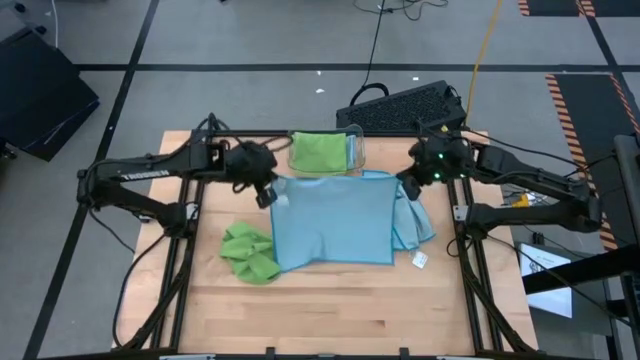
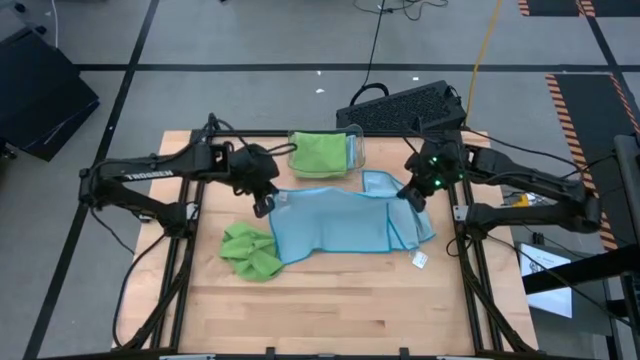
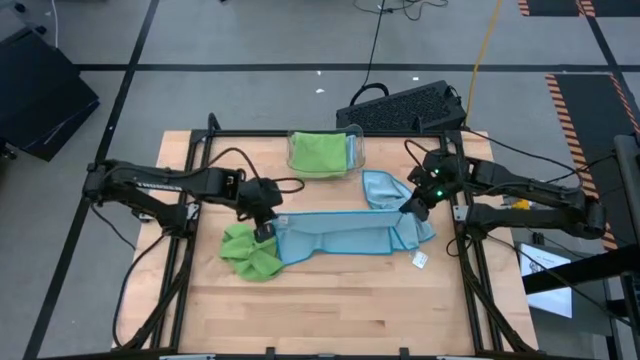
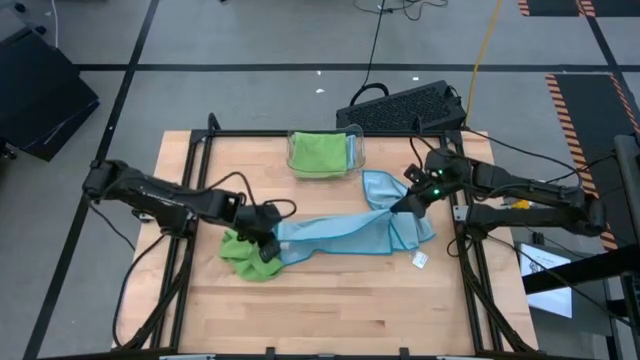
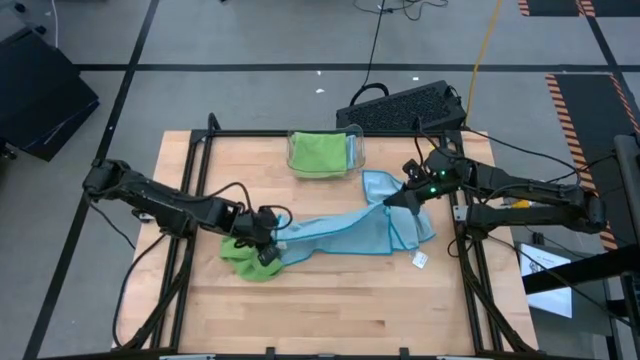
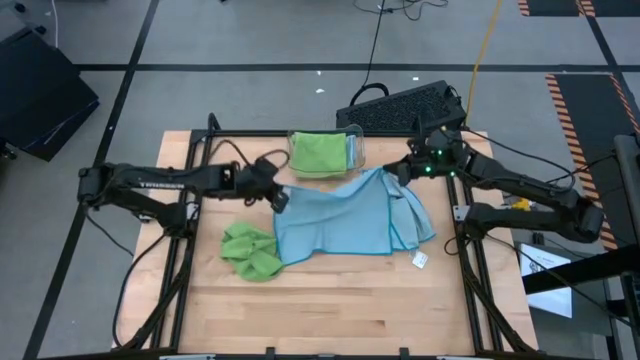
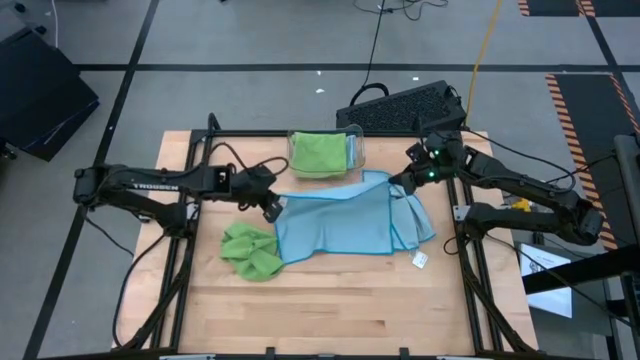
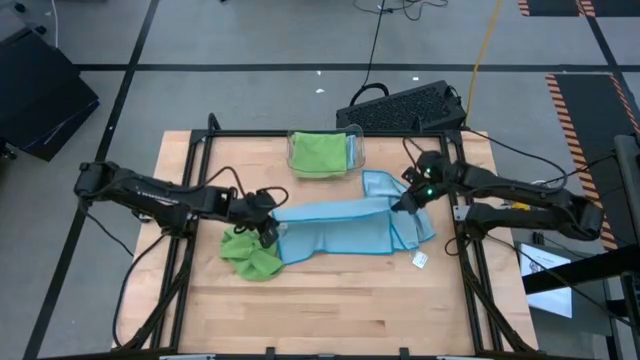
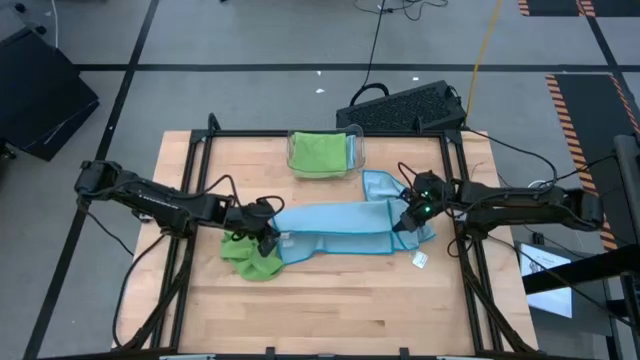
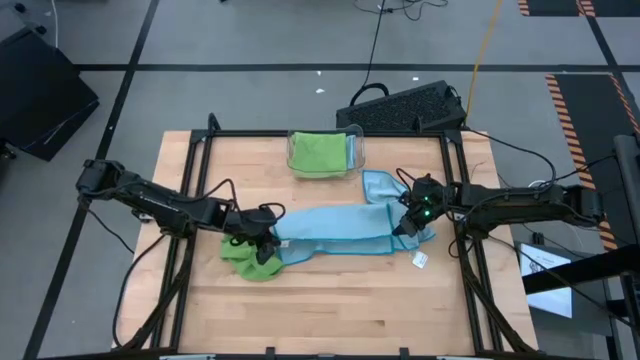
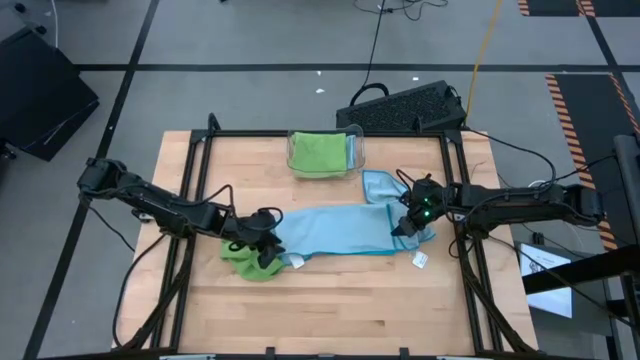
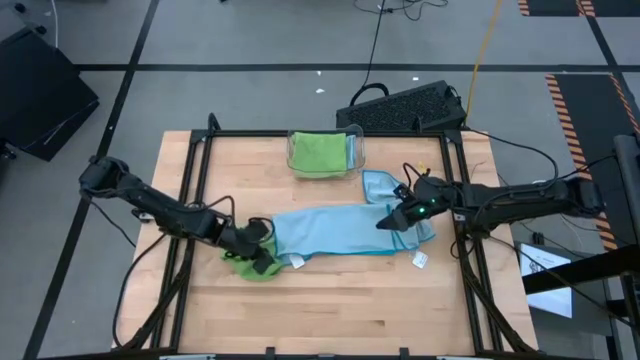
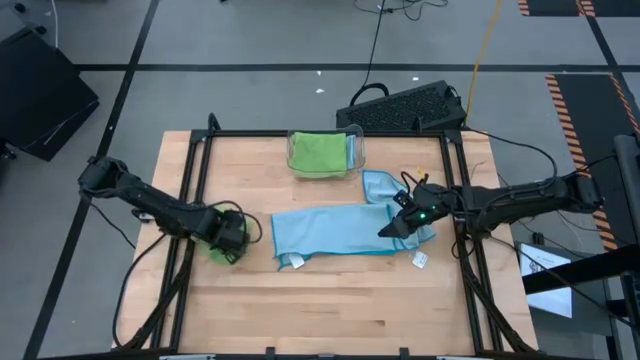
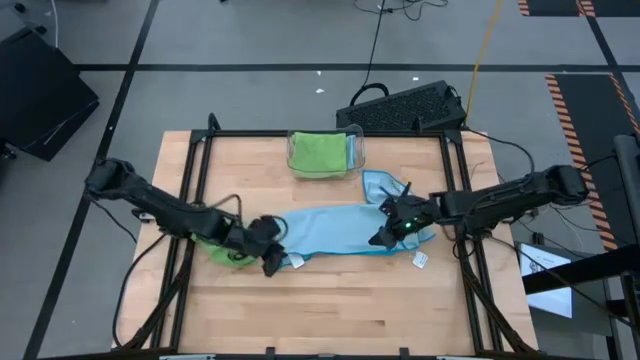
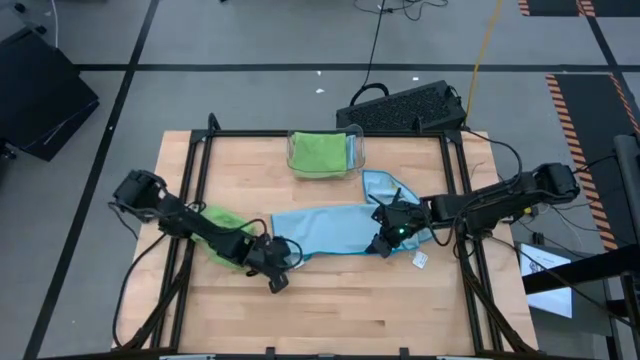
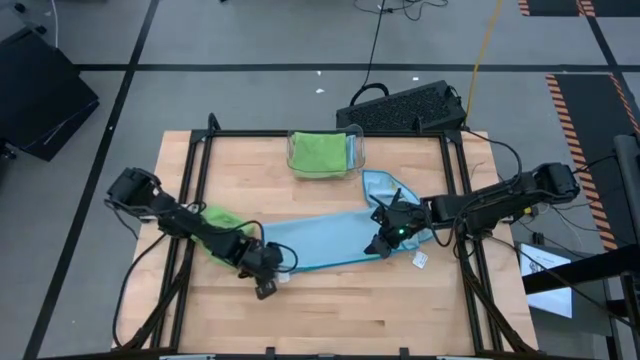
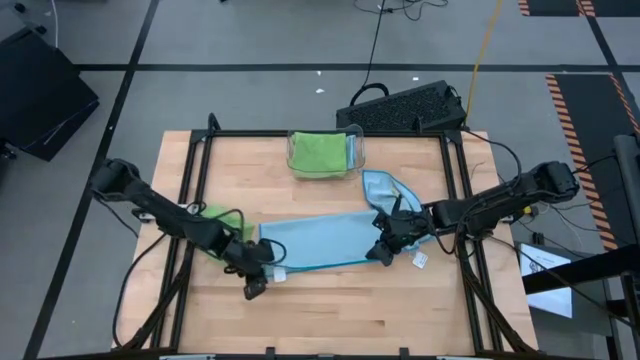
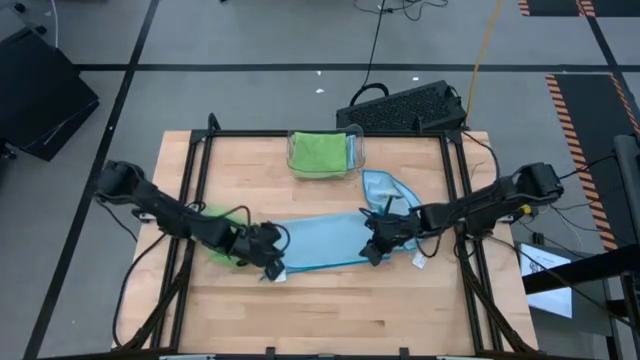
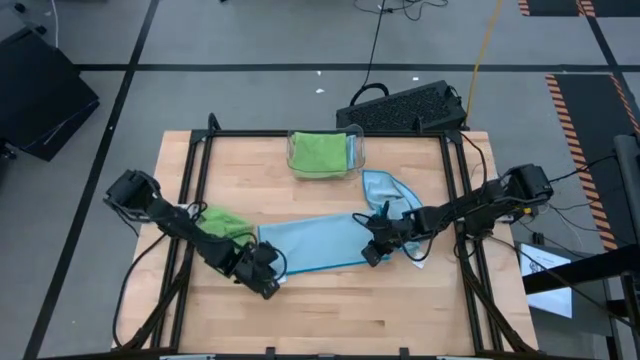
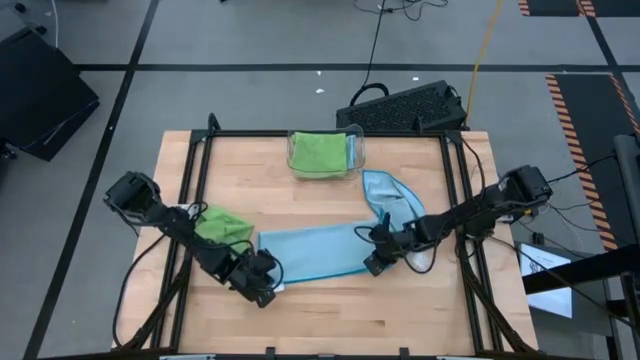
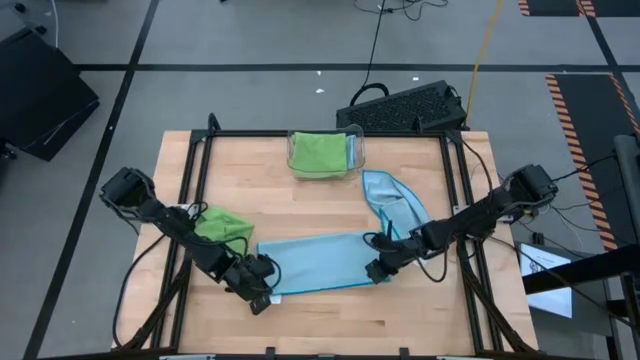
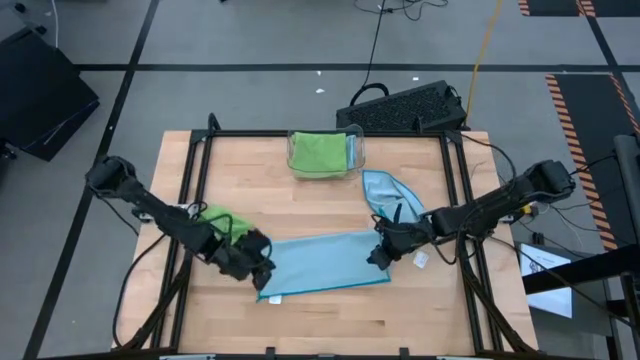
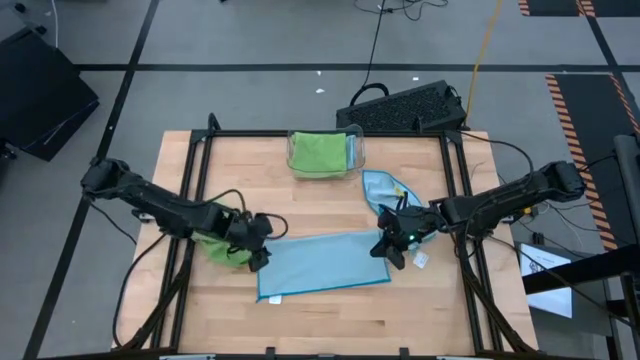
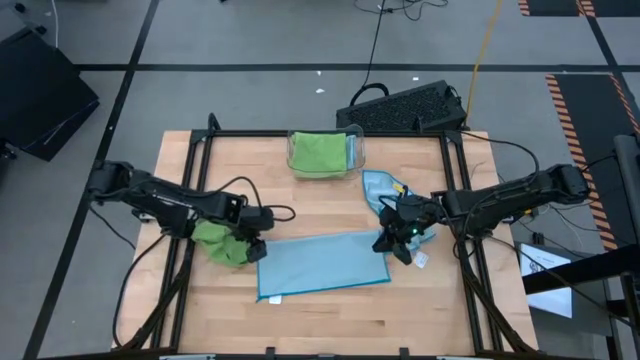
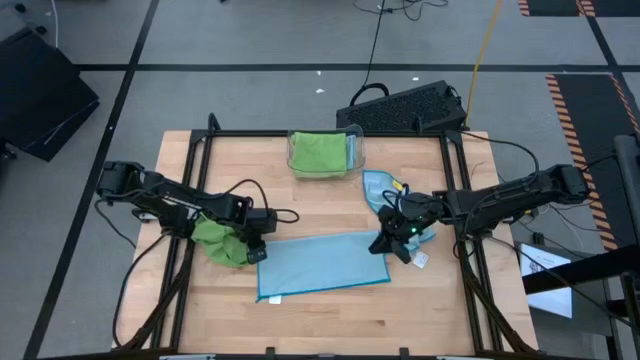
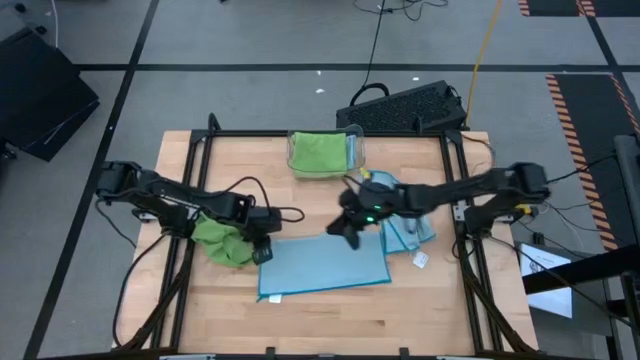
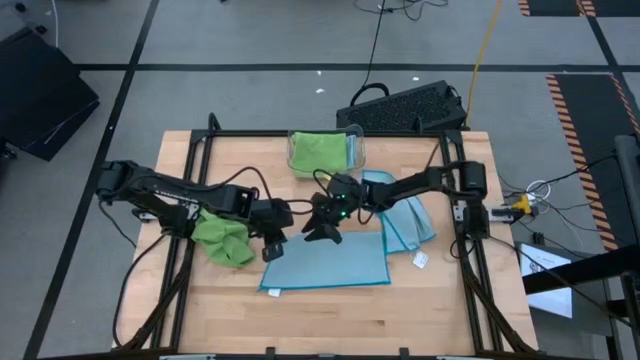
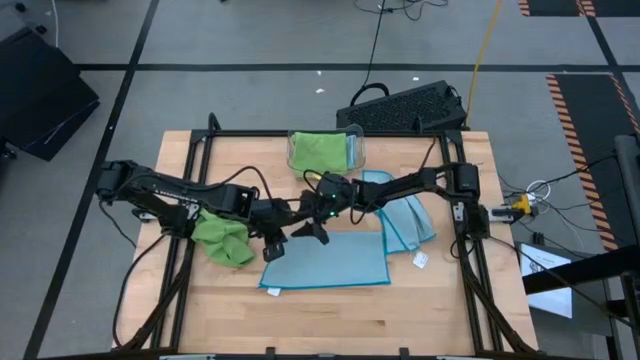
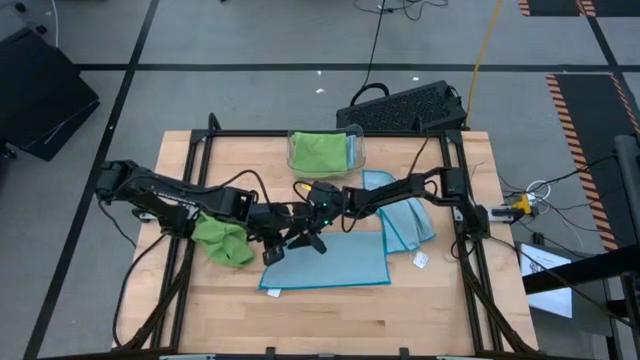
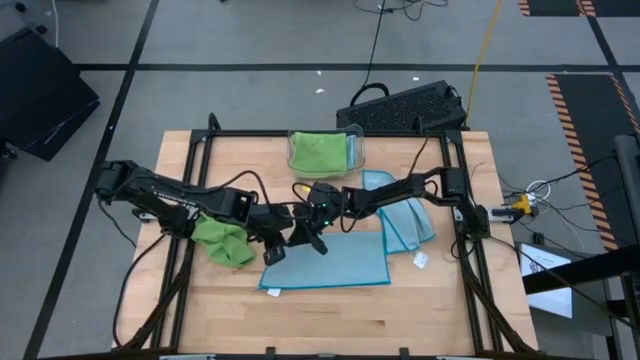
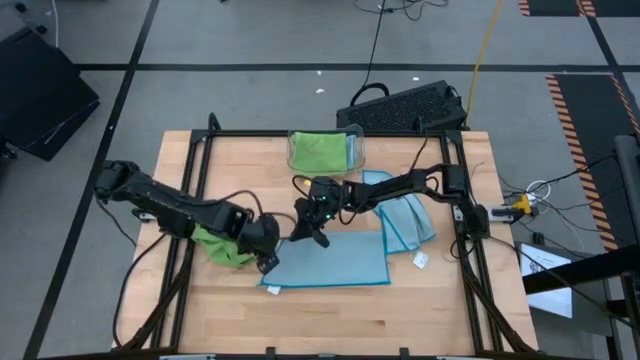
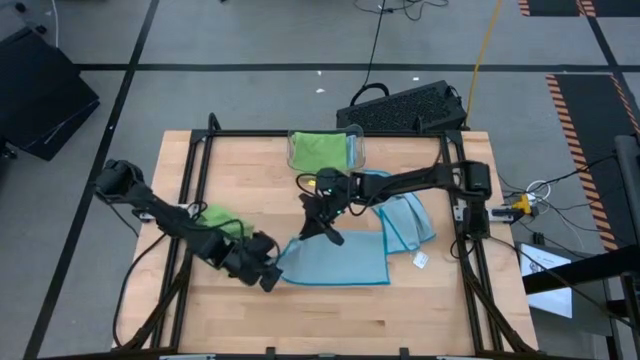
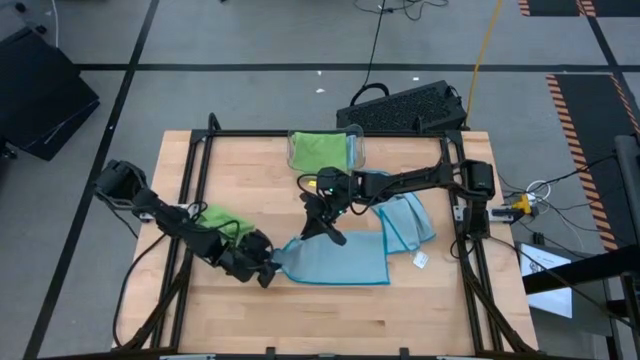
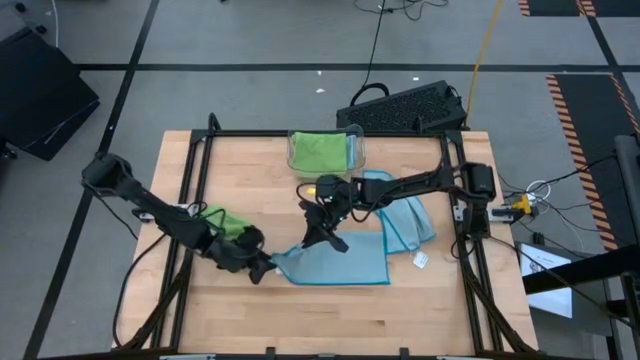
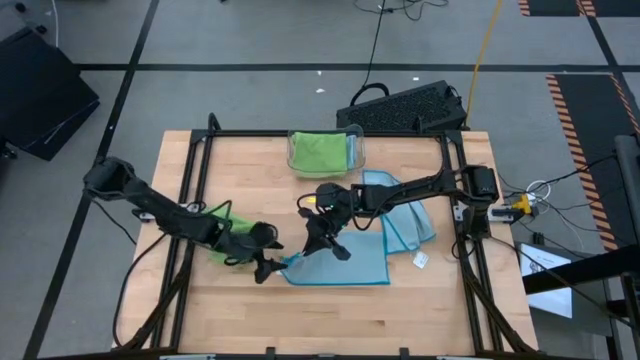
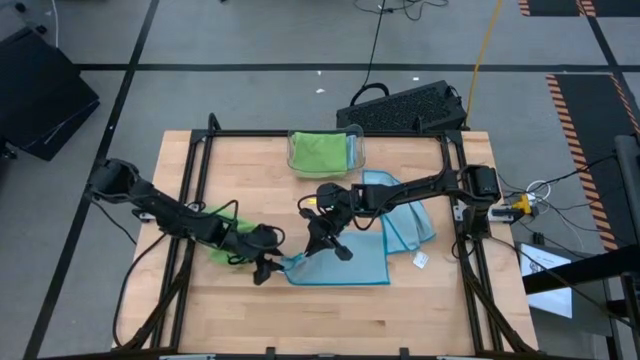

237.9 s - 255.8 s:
Task: Fold microfiber towels
Fold the left blue microfiber cloth

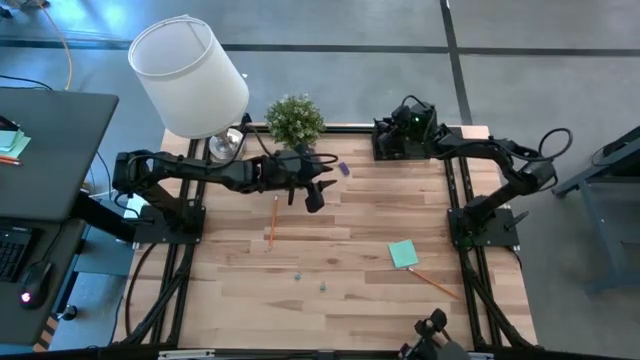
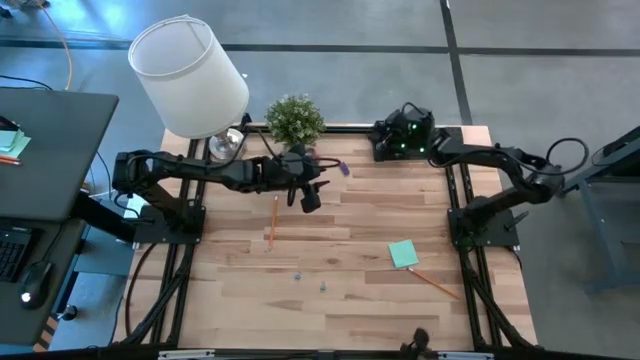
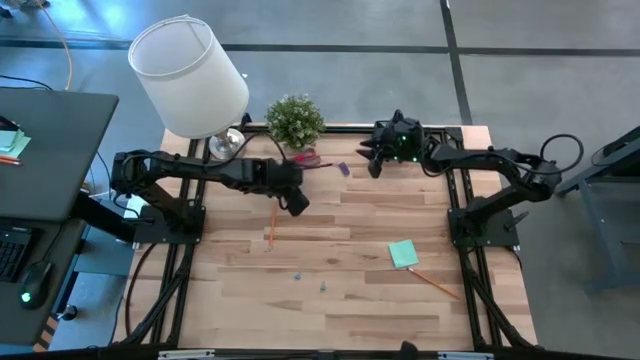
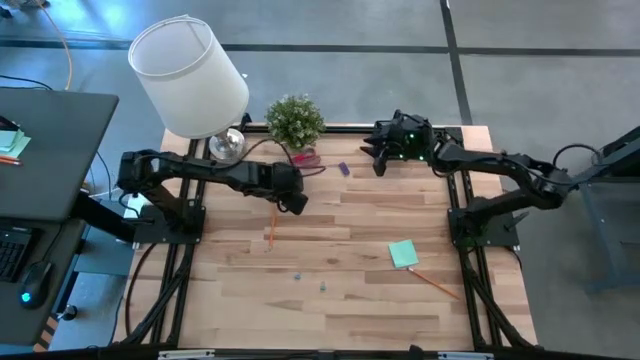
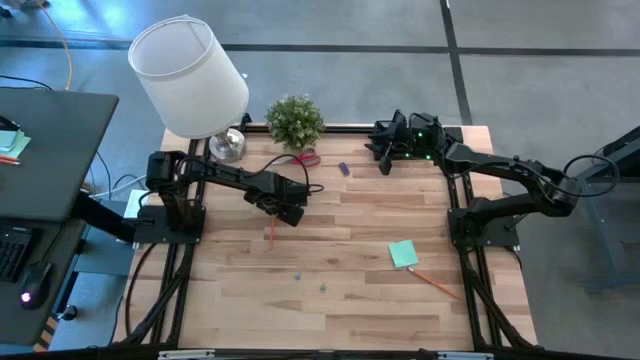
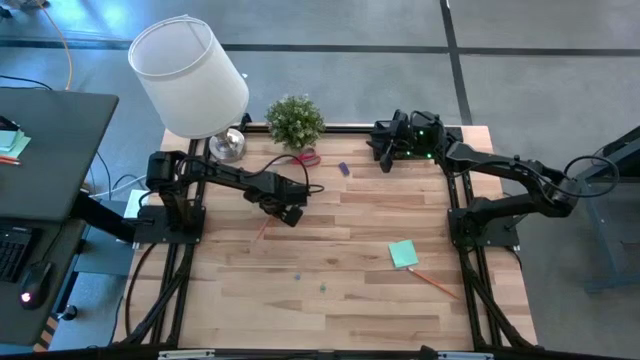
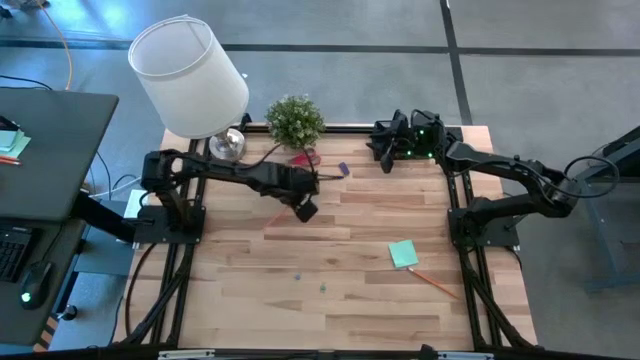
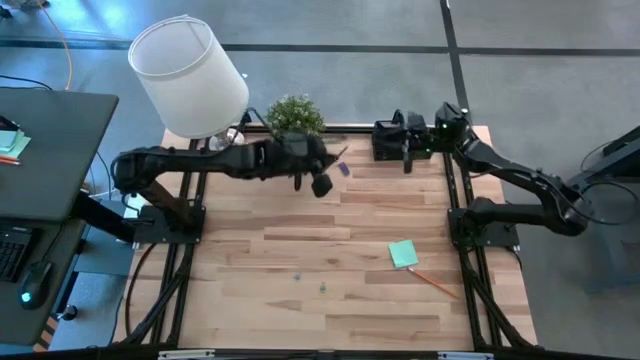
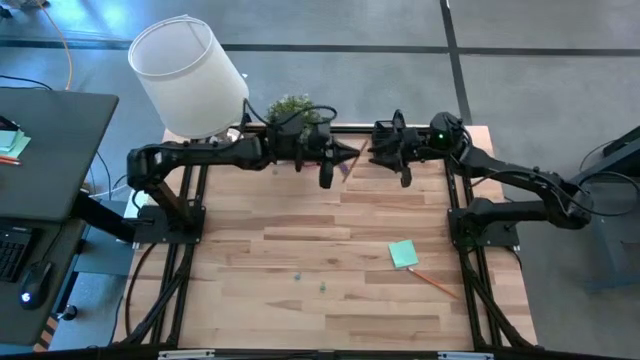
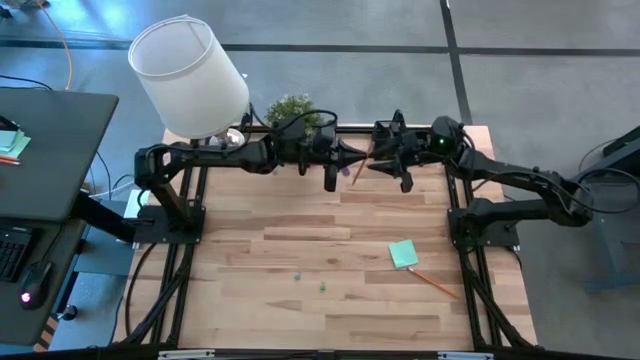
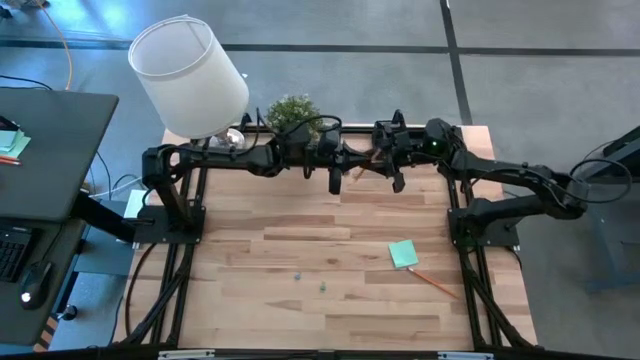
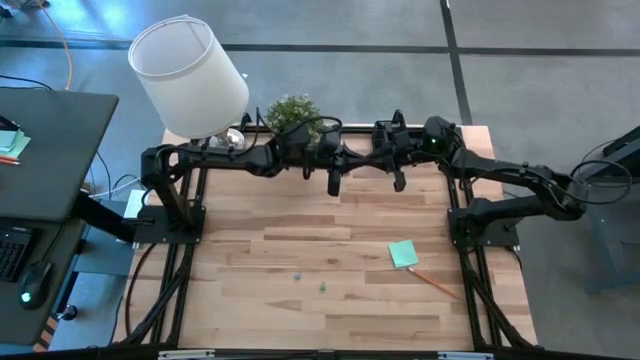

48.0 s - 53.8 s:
Task: Pick and place office supplies into organizer
Put the left orange pencil in the black desk organizer
